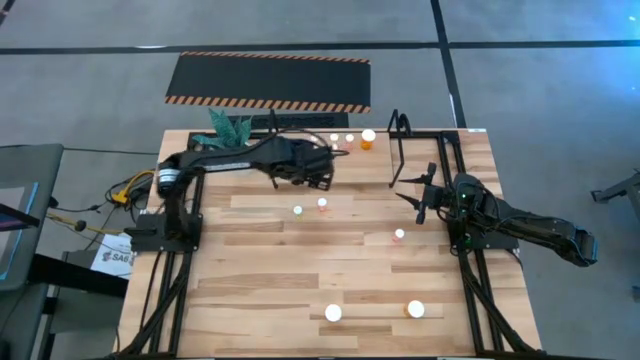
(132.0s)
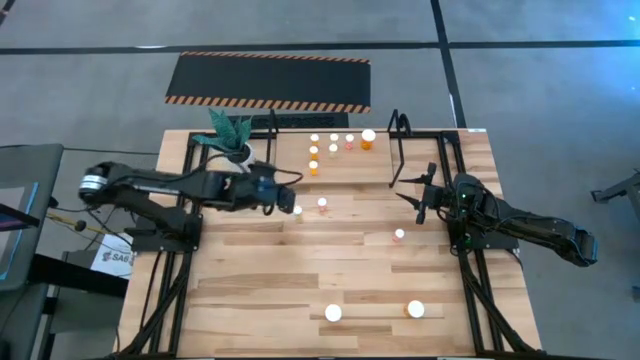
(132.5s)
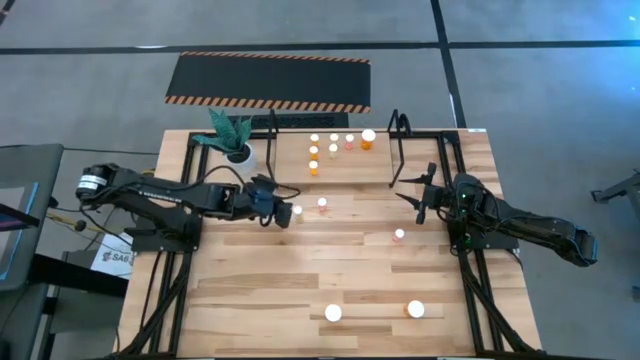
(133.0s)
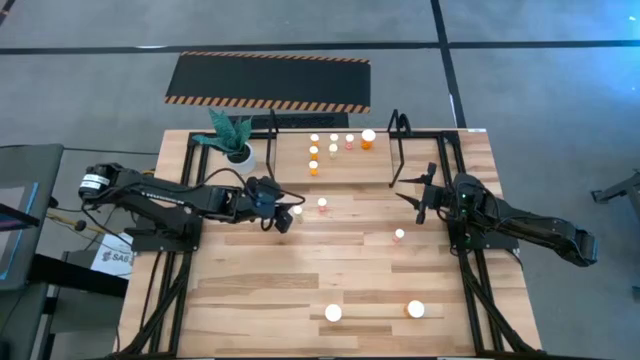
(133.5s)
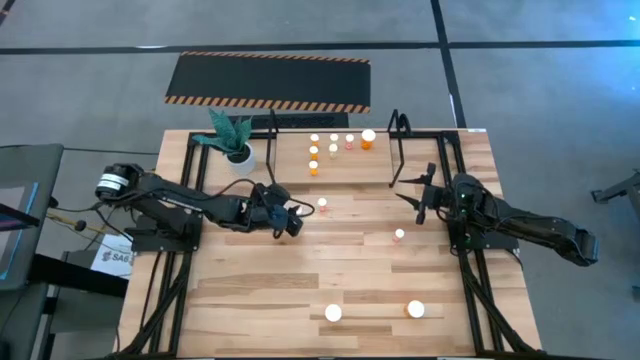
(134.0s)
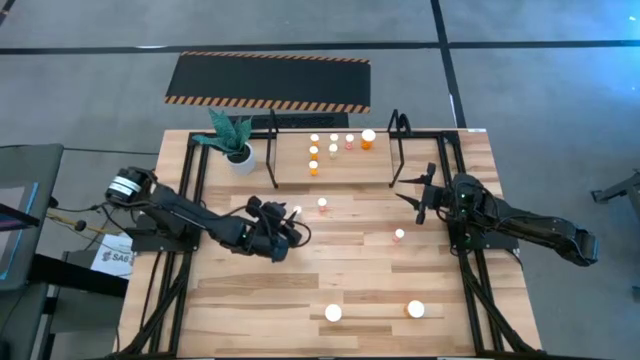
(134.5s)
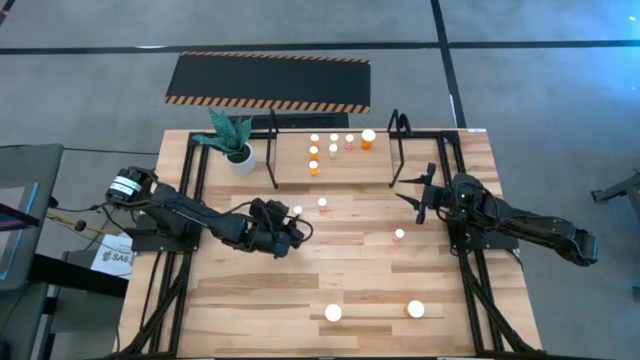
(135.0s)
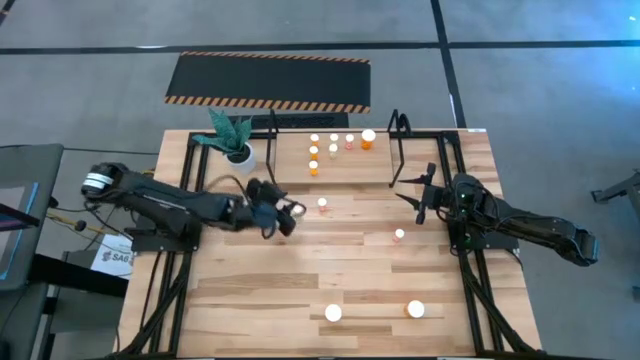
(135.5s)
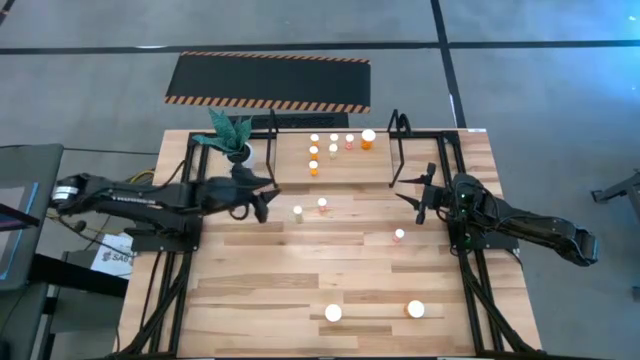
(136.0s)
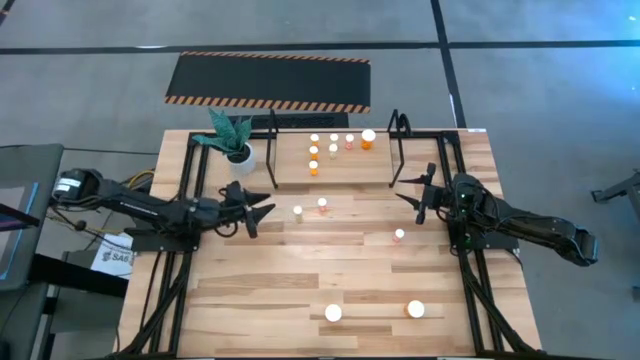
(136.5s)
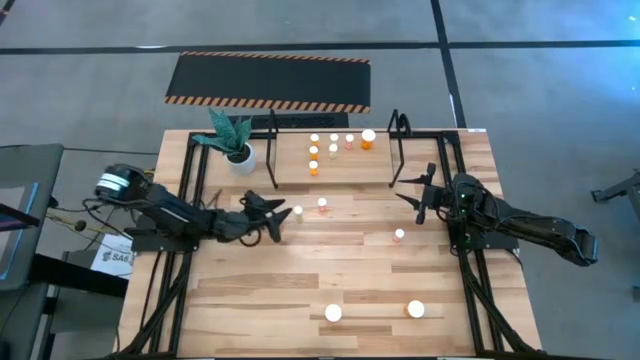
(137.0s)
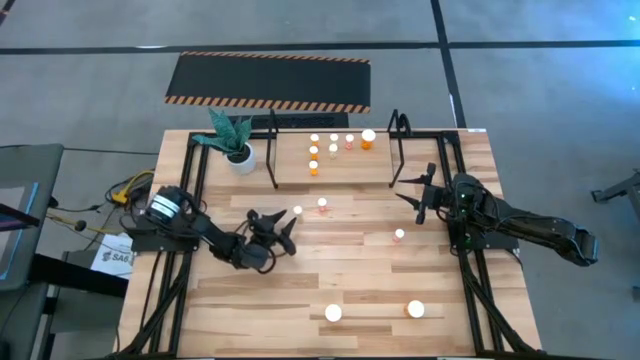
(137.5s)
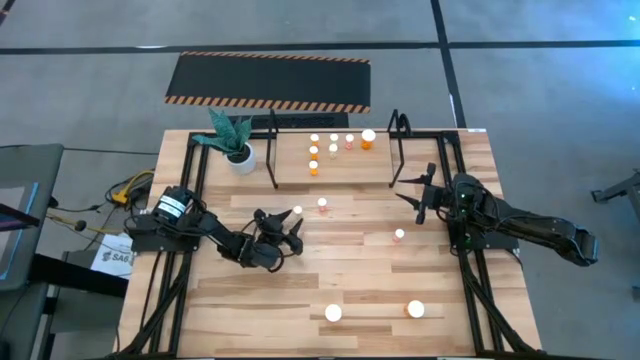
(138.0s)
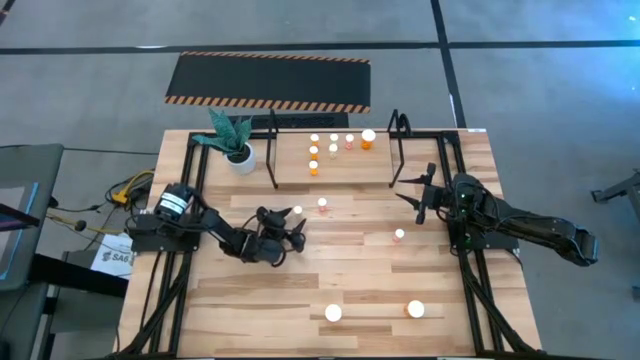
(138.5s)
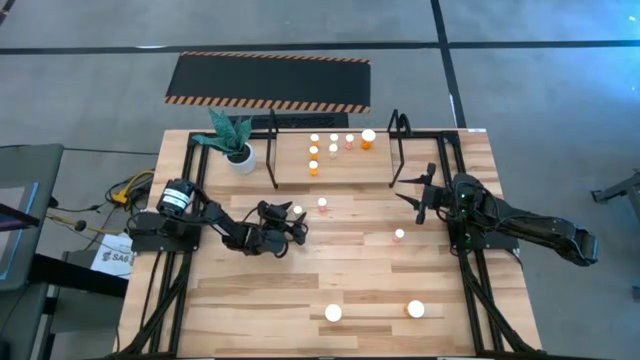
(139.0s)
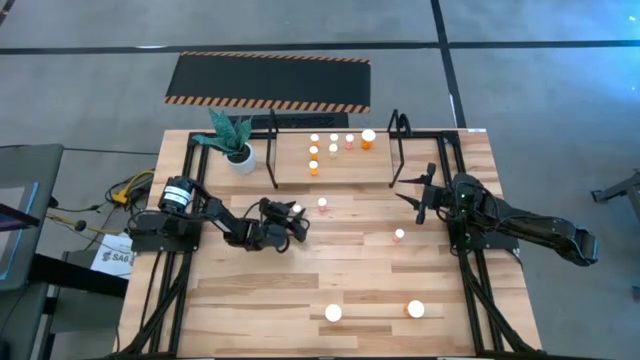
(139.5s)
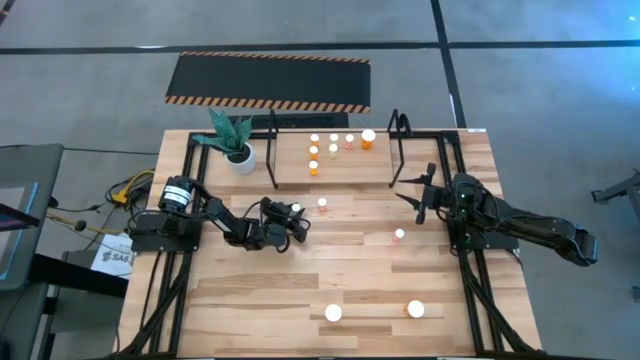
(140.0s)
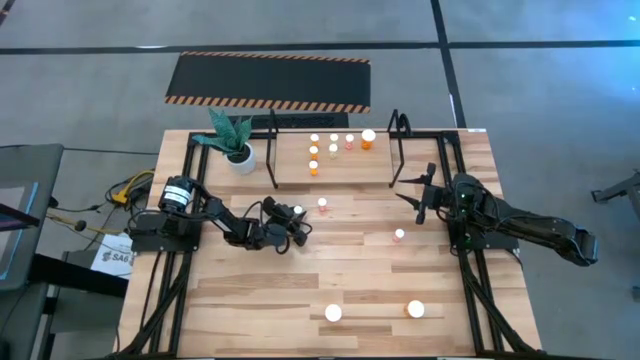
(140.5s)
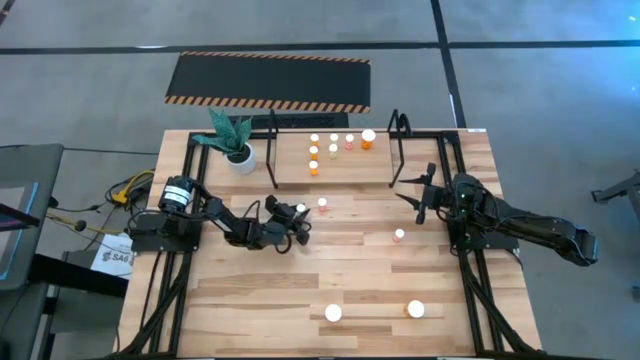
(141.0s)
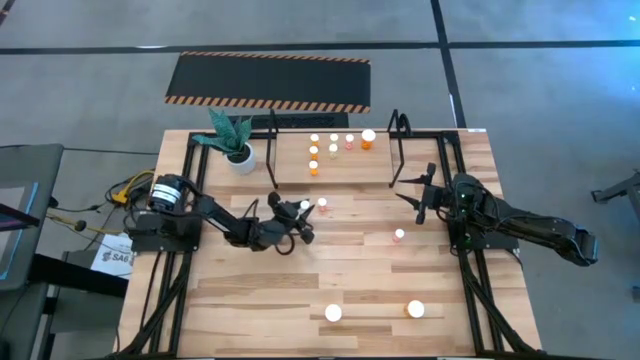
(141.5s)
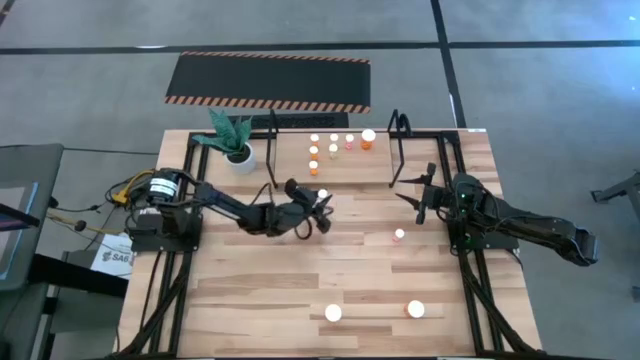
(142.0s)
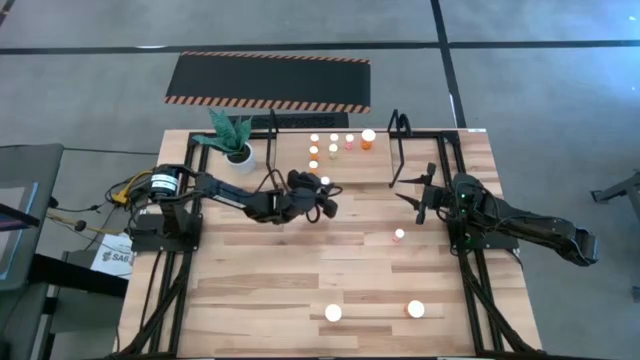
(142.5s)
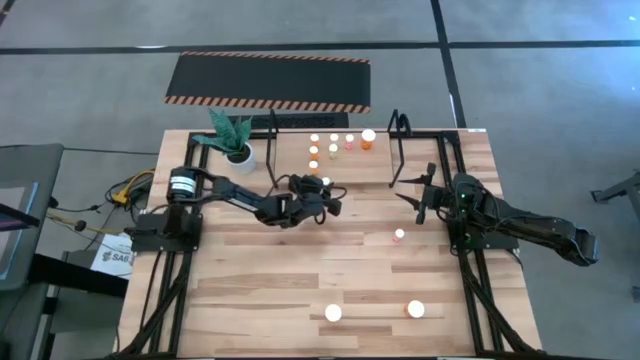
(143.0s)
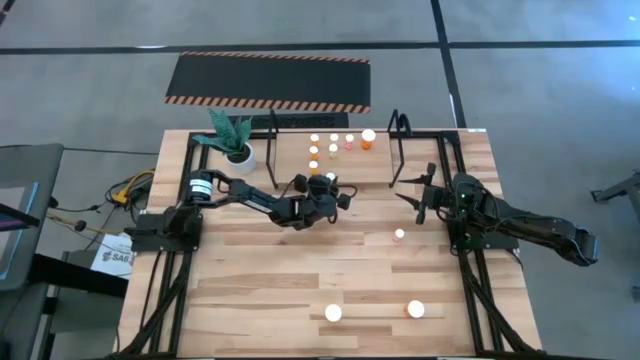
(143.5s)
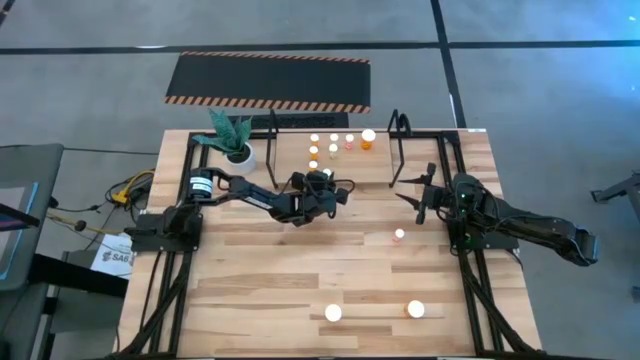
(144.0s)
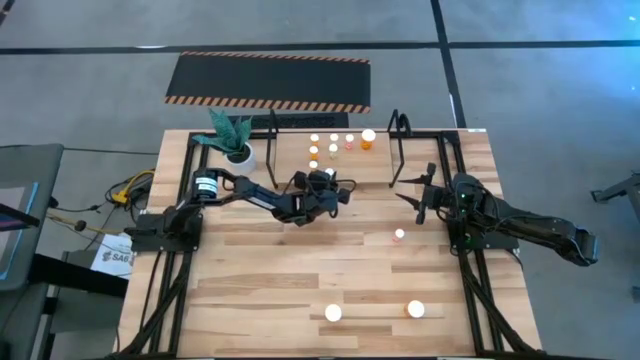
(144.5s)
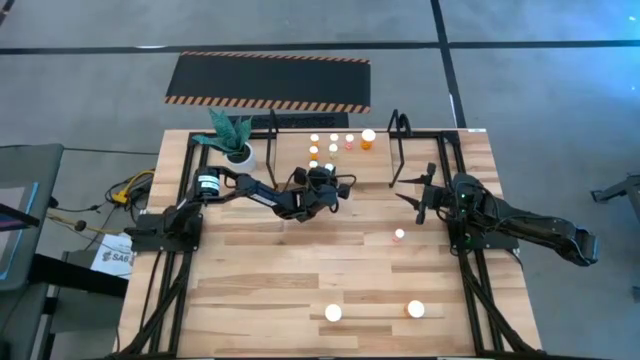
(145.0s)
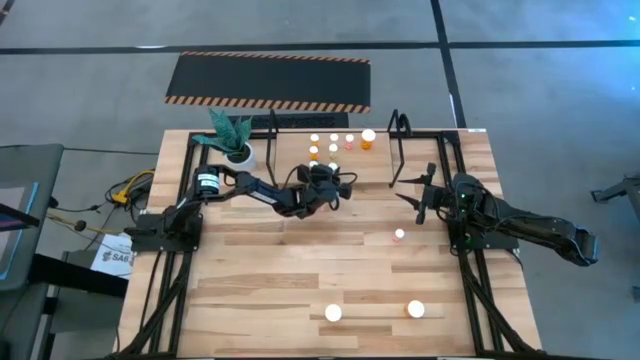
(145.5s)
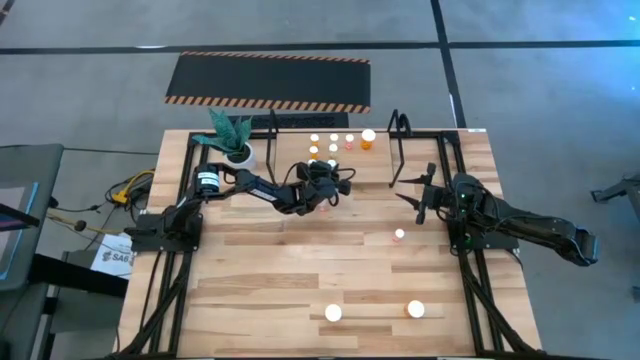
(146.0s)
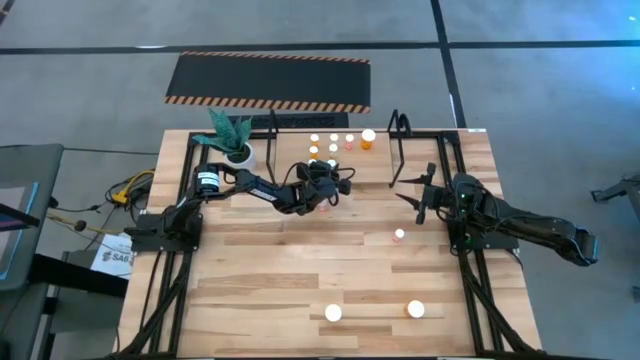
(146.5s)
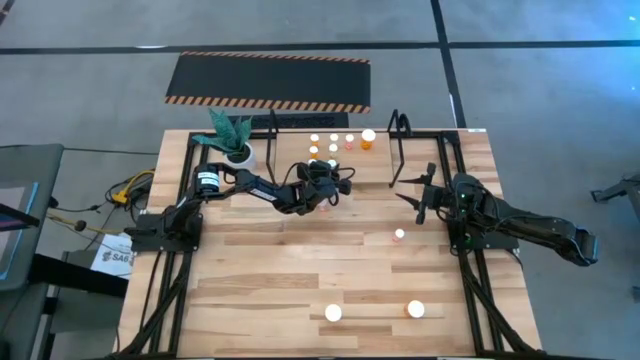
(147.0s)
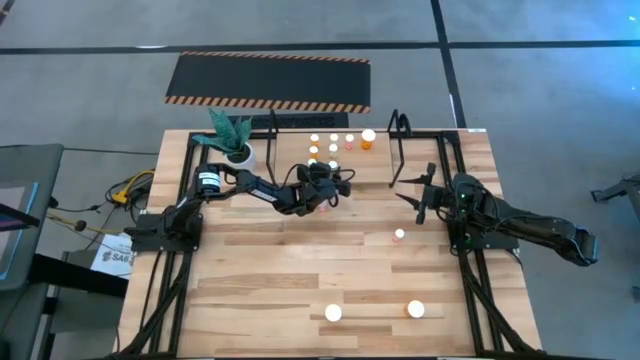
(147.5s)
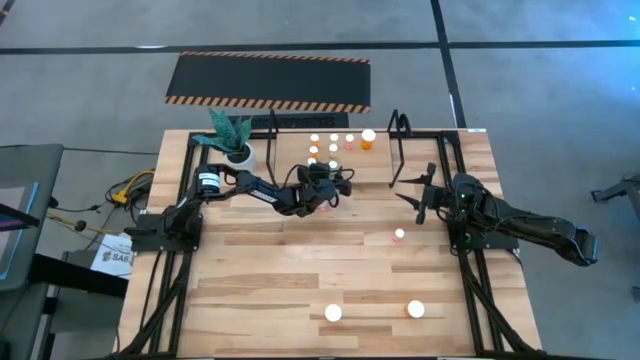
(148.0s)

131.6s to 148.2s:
Task: Pick and place medicine bottles onto shelf by color
Put the small yellow pill bottle aligned with the other yellow pill bottles on the shelf

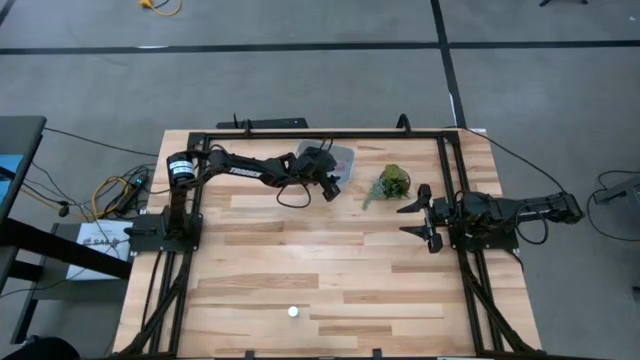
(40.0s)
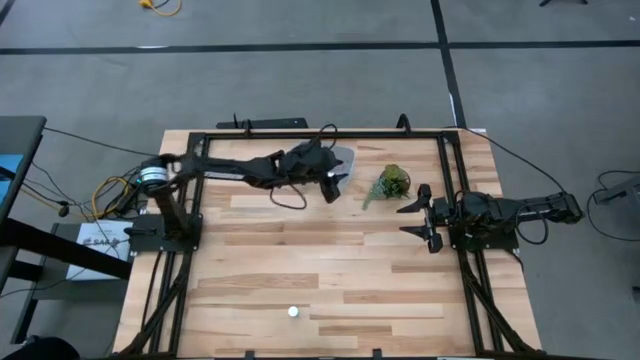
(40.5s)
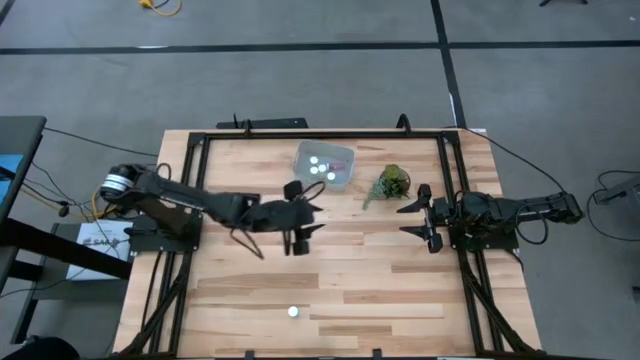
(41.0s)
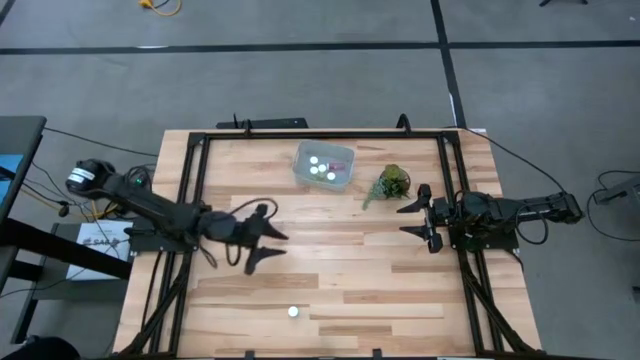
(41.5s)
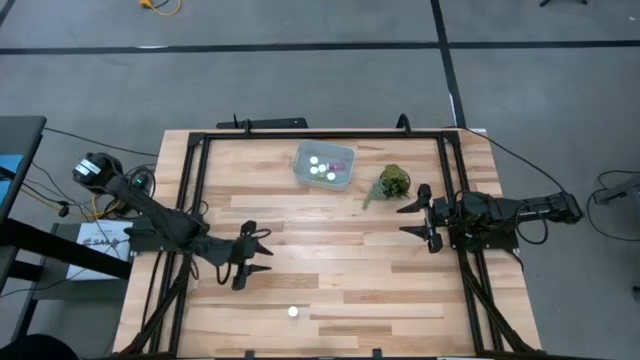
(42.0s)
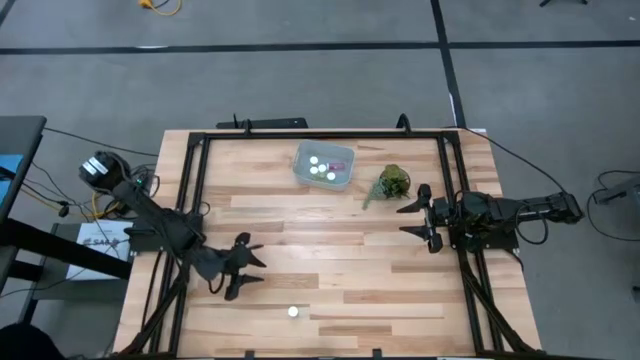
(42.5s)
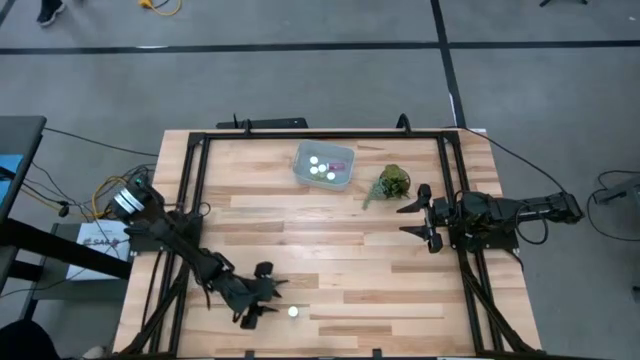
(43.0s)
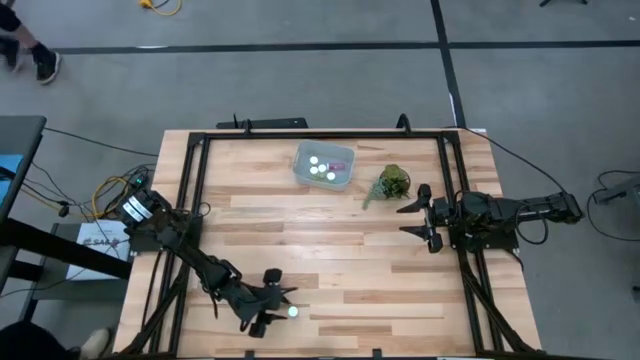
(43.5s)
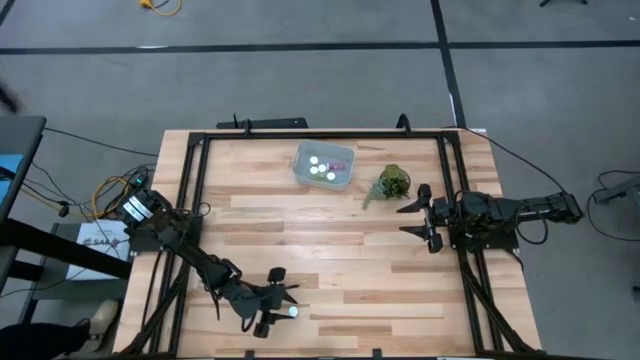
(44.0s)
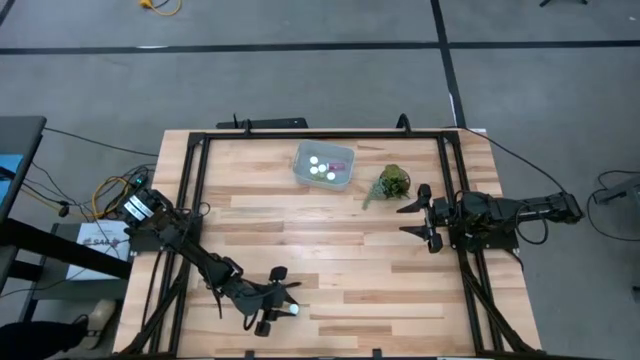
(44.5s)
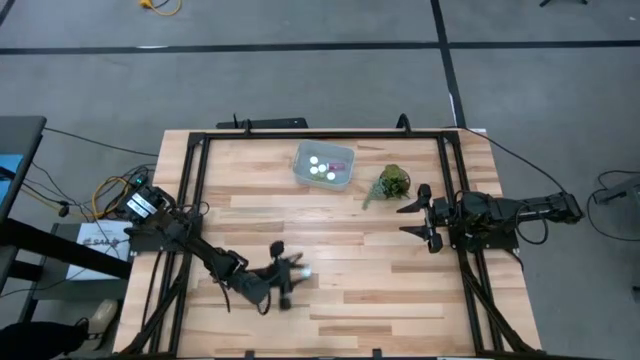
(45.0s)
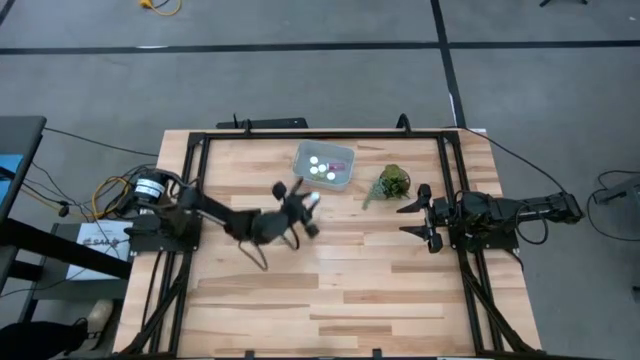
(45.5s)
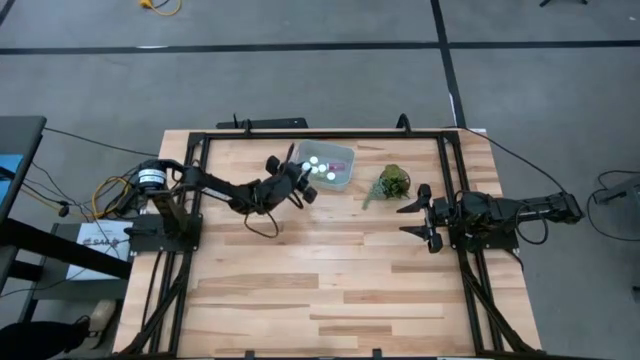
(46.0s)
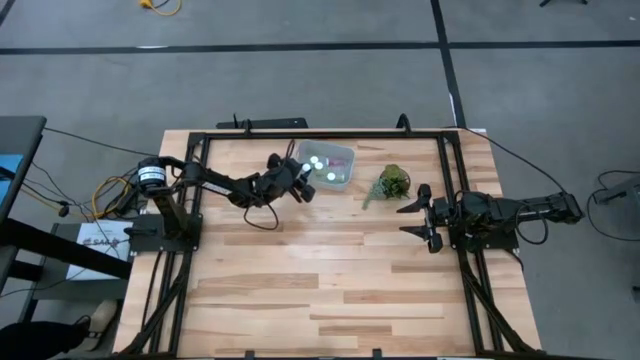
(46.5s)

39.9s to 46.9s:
Task: Pick and place pill bottles into a basket
Put the blue pill bottle into the gray bin
